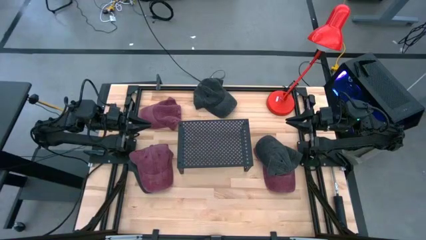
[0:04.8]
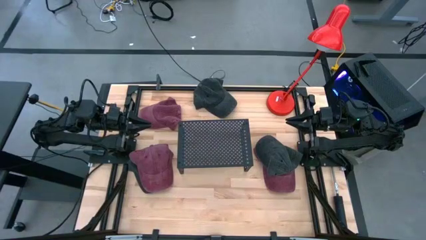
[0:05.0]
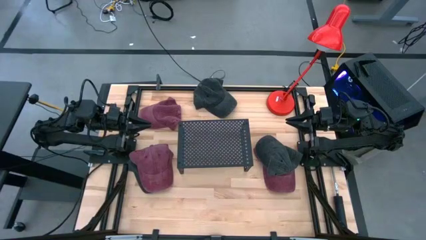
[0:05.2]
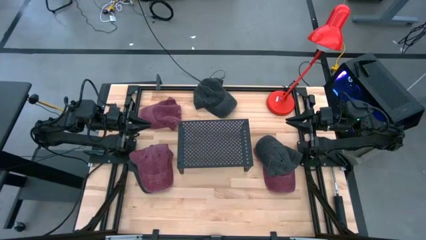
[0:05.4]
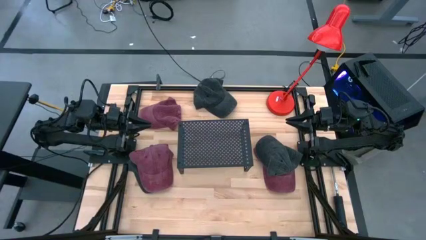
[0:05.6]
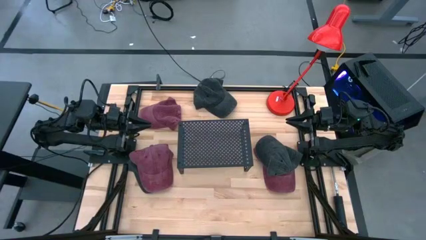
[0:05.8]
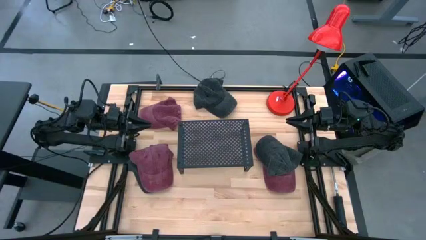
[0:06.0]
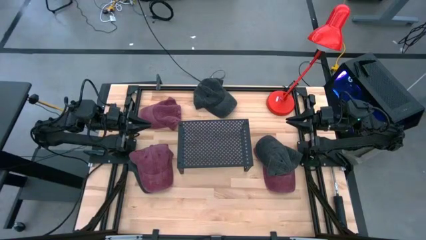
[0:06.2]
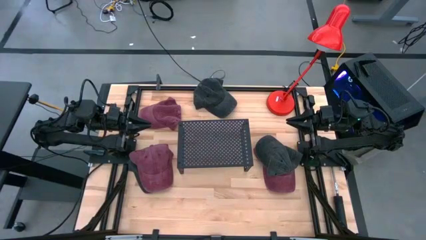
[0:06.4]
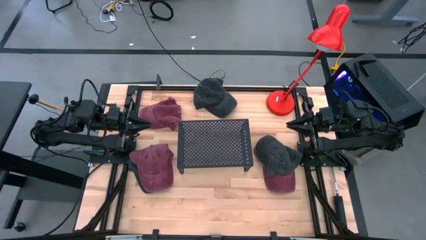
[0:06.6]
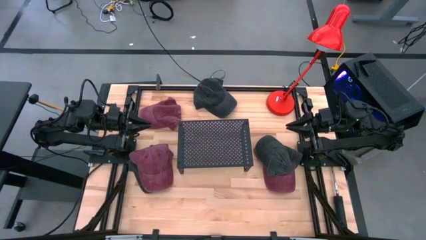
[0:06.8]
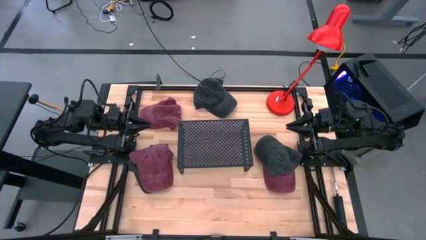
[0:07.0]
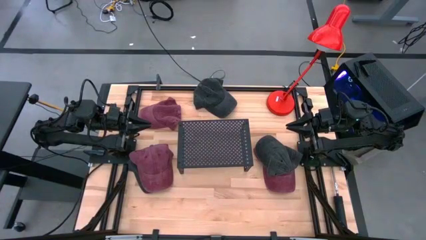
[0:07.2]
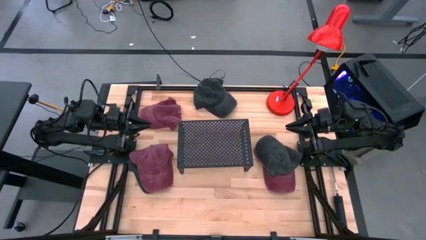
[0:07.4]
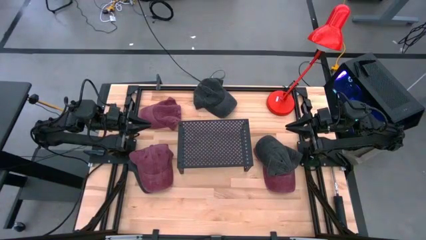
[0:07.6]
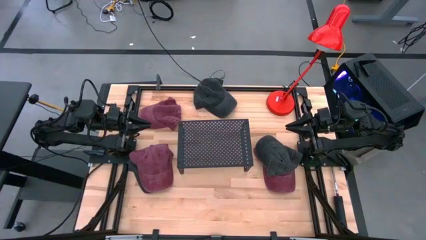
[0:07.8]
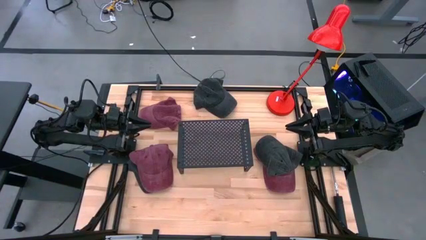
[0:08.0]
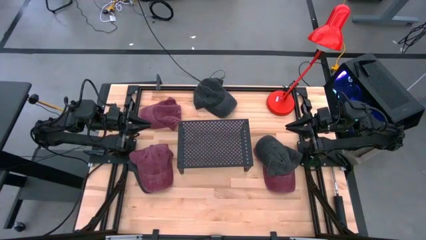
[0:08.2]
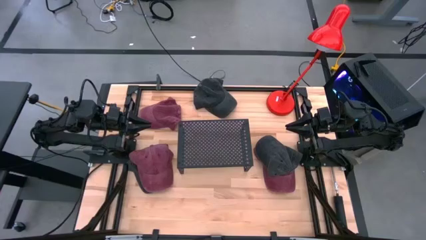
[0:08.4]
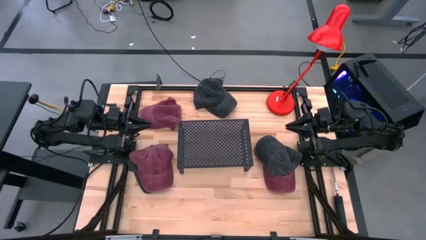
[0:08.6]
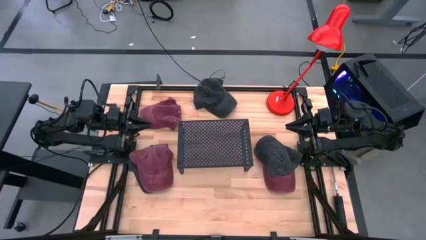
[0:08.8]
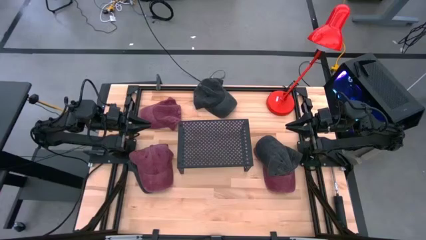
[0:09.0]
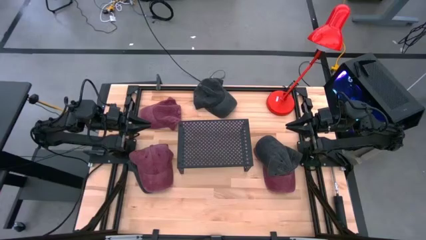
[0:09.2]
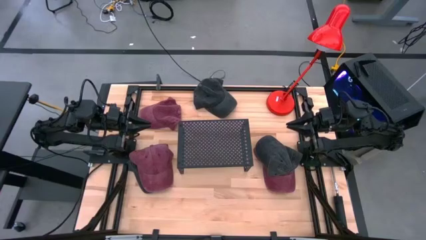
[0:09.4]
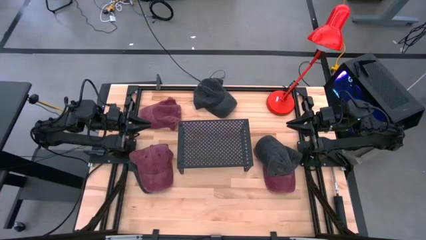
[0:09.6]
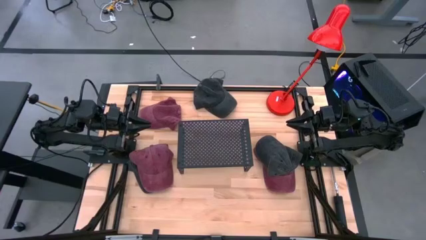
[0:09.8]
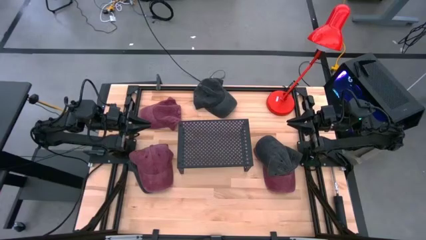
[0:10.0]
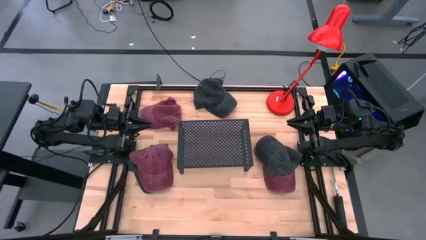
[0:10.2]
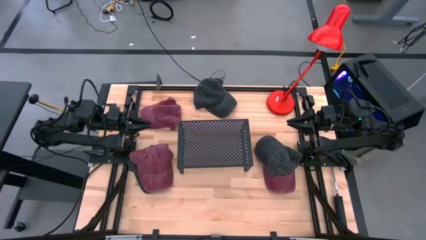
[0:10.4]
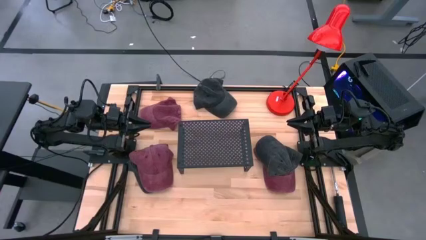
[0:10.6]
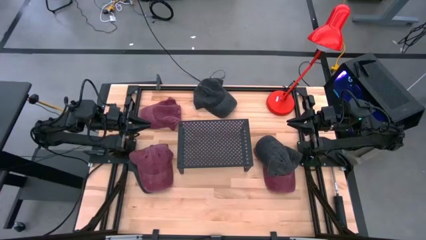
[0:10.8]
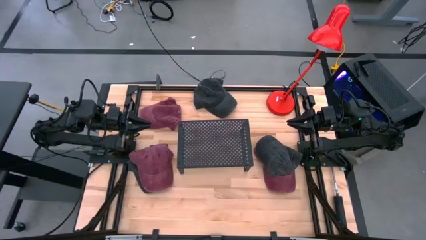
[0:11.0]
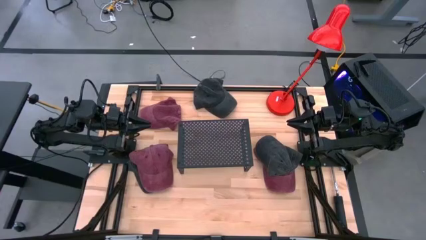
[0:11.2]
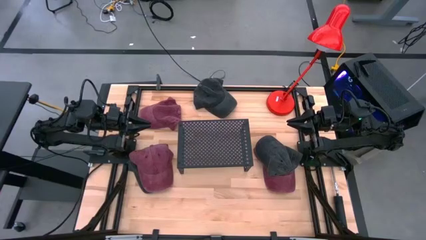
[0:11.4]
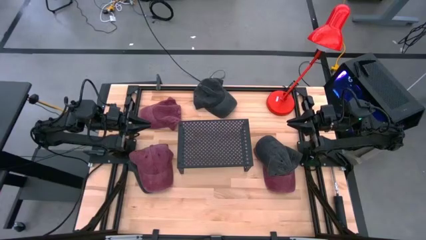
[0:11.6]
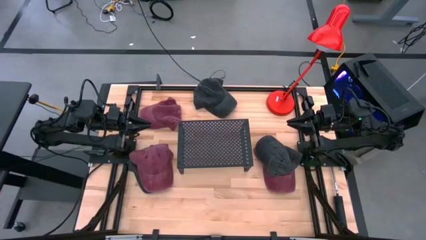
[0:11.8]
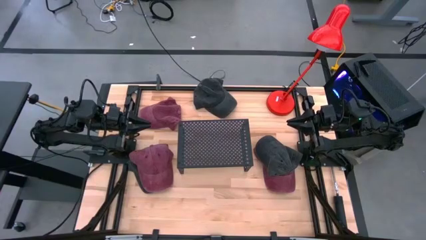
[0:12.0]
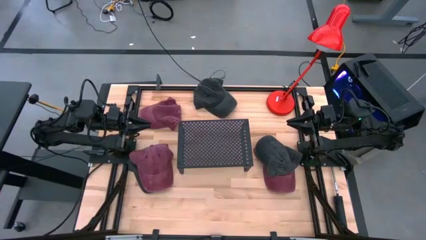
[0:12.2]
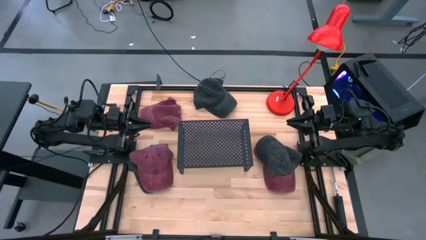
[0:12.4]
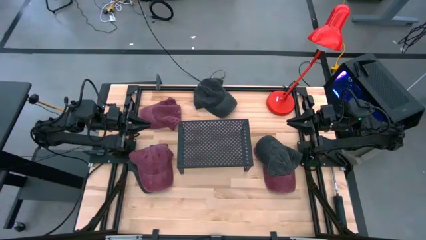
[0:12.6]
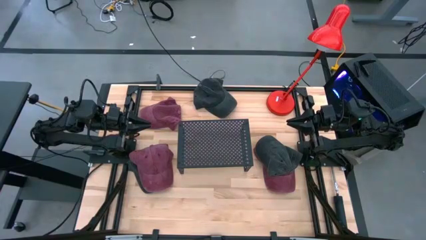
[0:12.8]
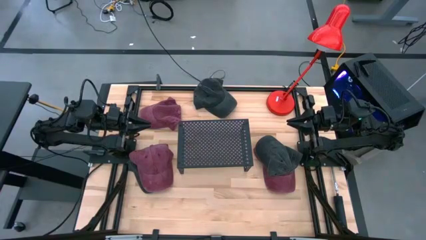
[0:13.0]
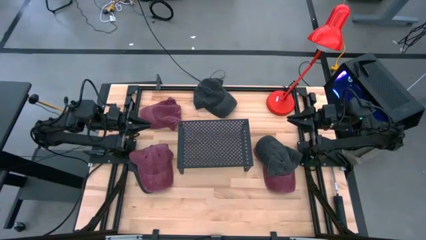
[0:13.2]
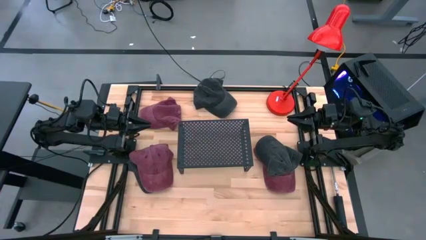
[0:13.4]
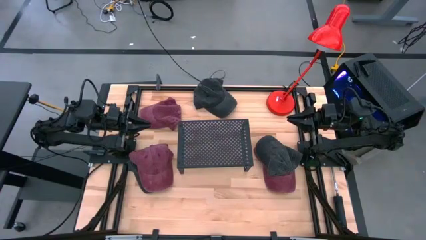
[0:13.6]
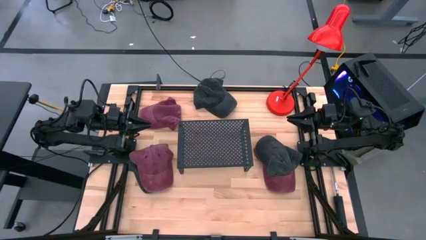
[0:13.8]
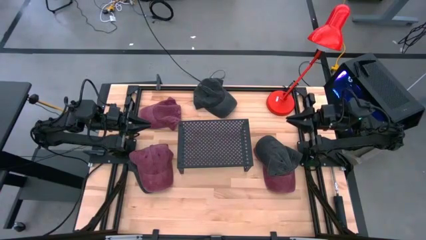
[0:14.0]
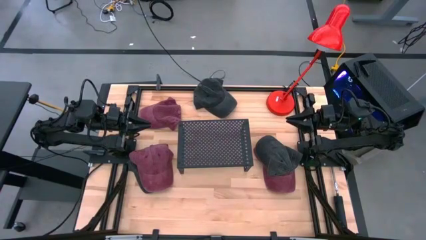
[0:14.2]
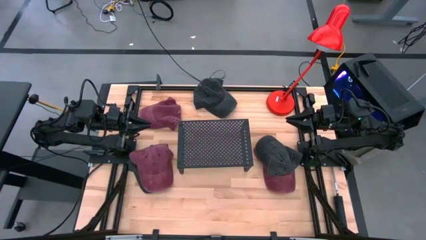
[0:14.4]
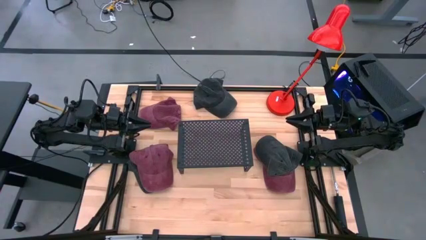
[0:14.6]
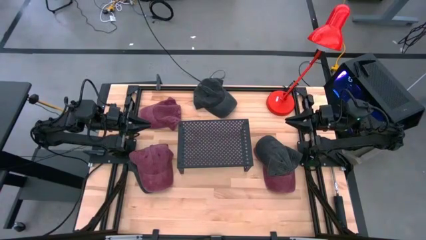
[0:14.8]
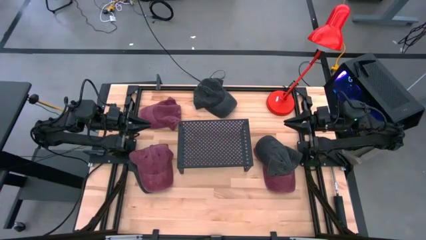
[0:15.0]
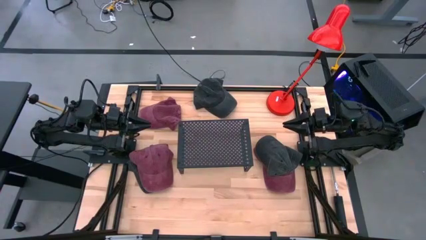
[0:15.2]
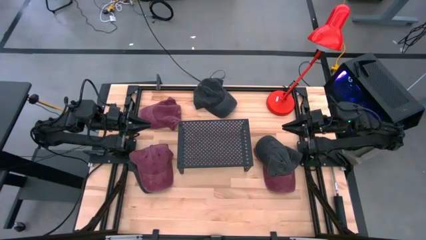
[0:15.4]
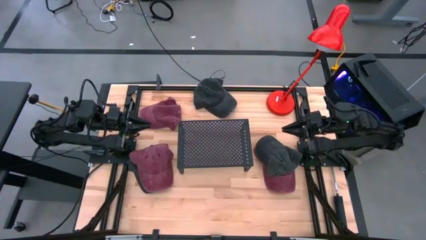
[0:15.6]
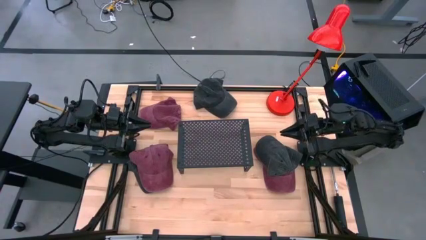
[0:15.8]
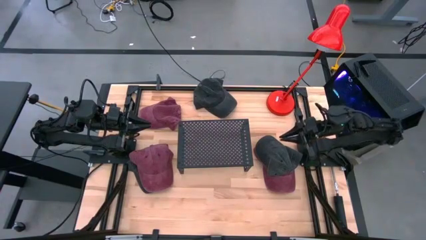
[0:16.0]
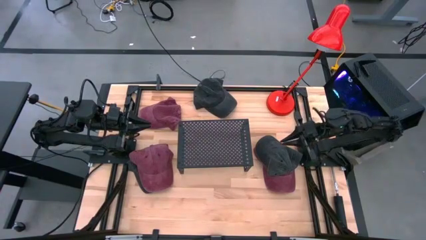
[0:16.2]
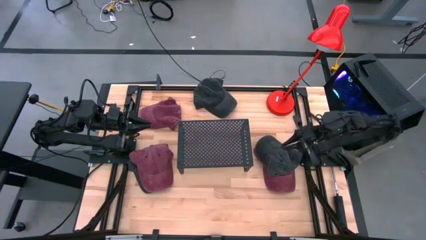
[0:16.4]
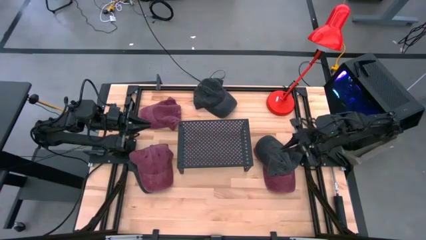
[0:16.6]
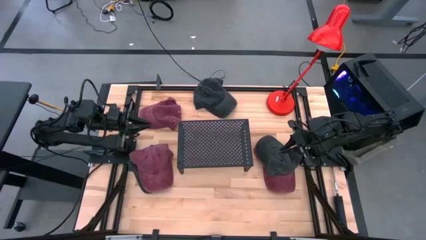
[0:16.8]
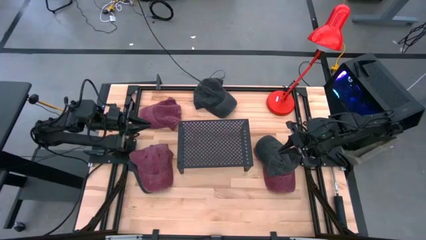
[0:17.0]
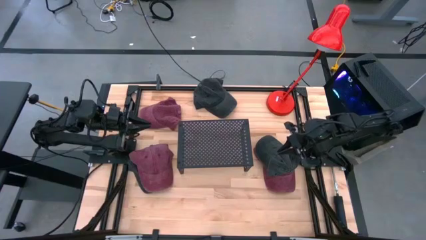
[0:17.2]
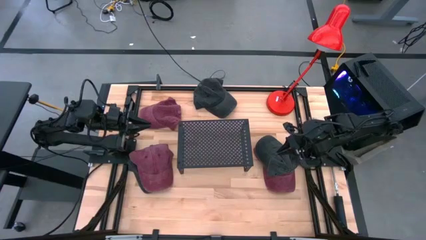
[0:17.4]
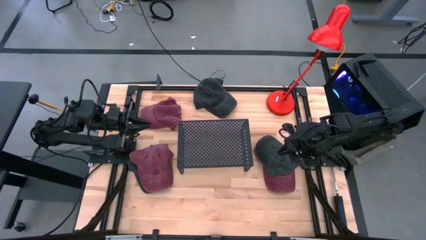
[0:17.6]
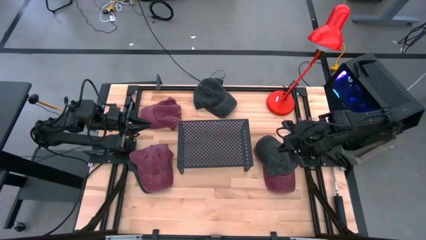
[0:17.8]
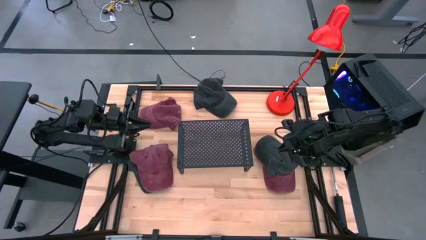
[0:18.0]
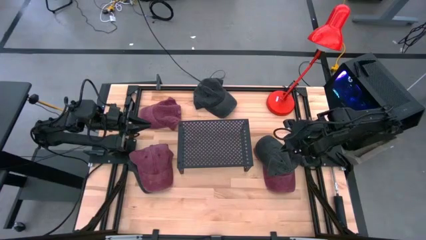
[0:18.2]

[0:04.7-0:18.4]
Task: Pick & Place hat
Put the bottom right black cap on the shelf

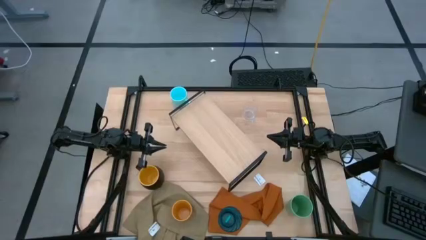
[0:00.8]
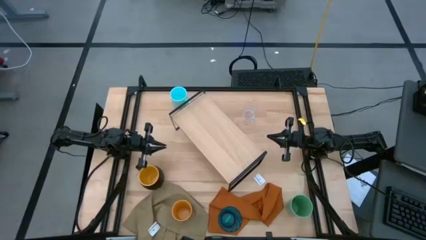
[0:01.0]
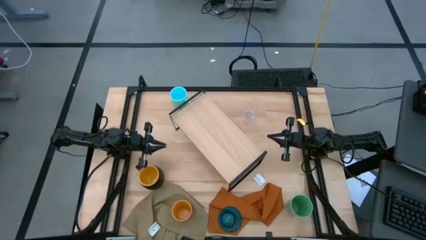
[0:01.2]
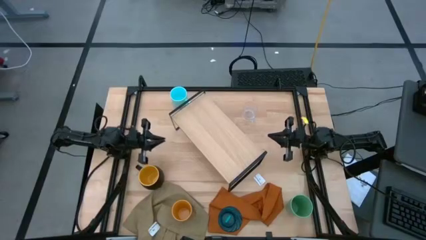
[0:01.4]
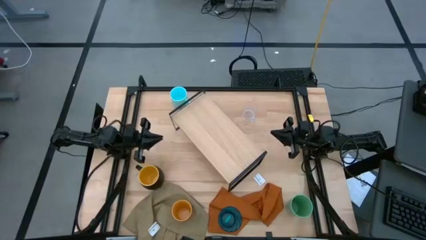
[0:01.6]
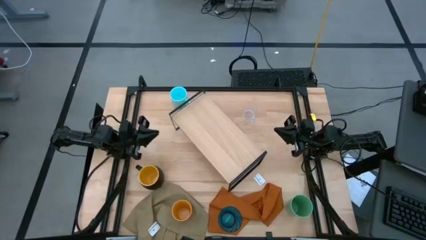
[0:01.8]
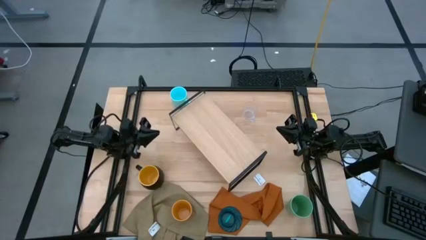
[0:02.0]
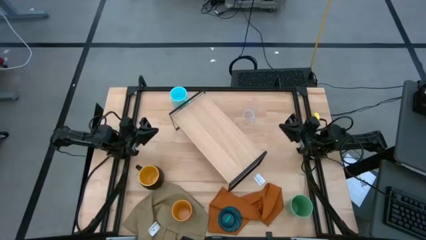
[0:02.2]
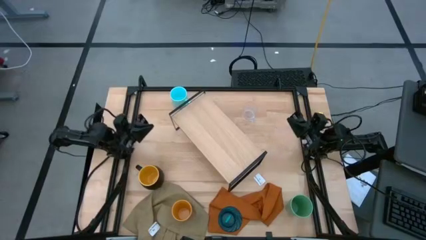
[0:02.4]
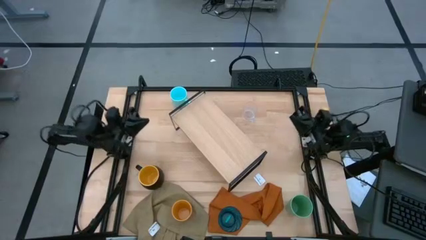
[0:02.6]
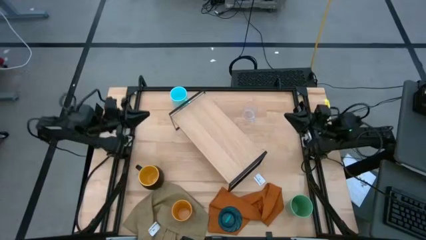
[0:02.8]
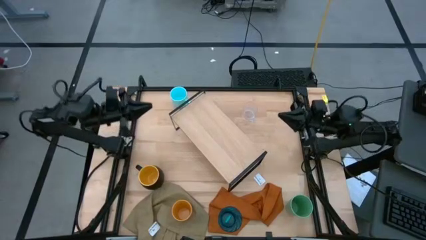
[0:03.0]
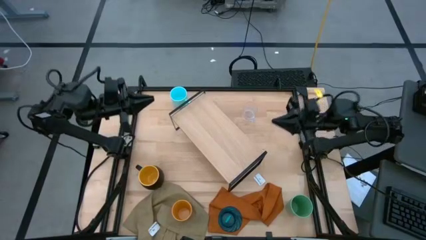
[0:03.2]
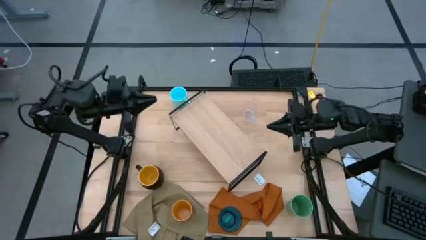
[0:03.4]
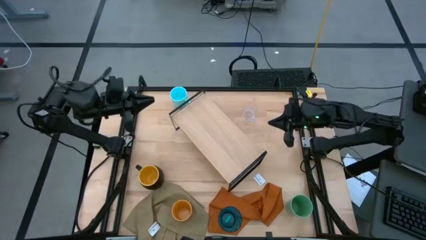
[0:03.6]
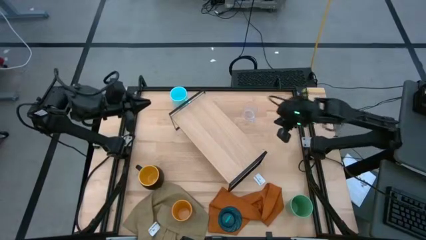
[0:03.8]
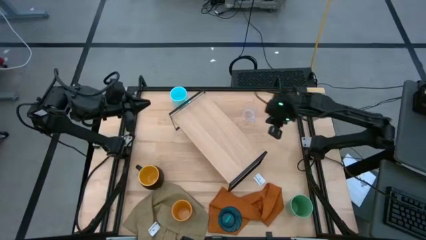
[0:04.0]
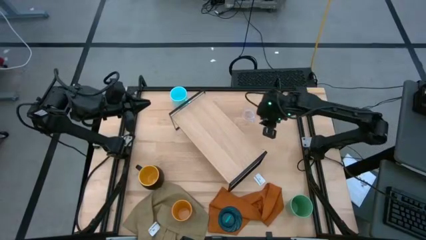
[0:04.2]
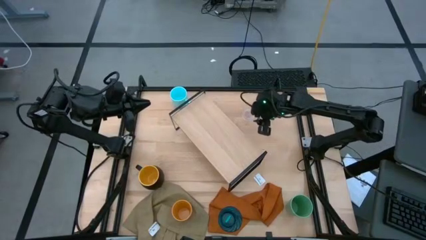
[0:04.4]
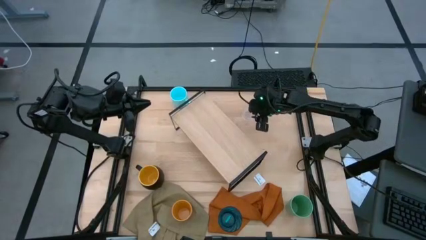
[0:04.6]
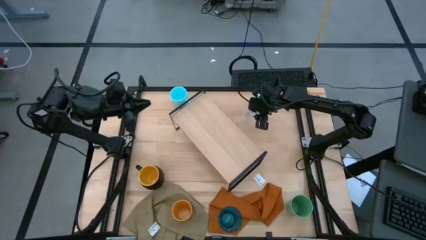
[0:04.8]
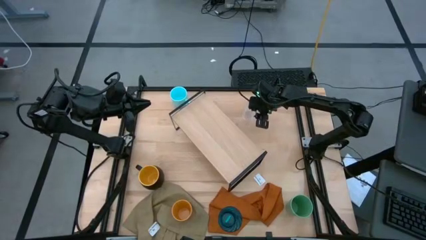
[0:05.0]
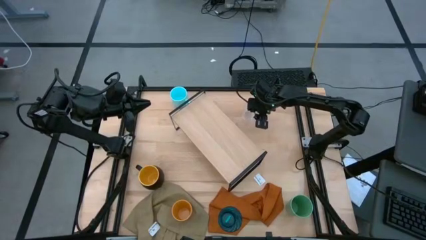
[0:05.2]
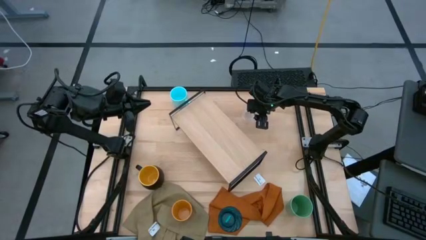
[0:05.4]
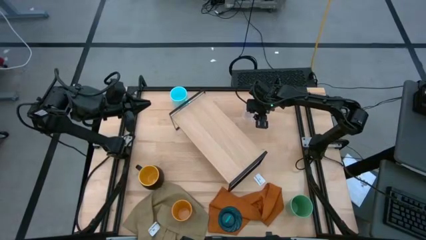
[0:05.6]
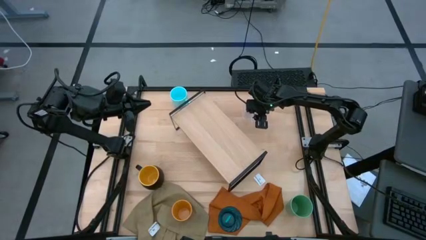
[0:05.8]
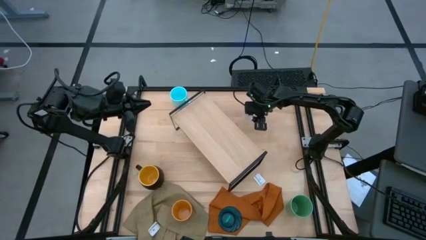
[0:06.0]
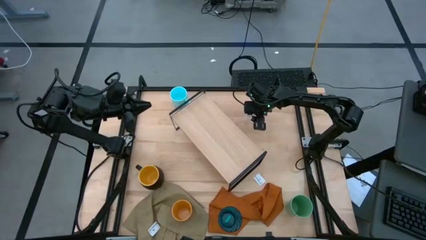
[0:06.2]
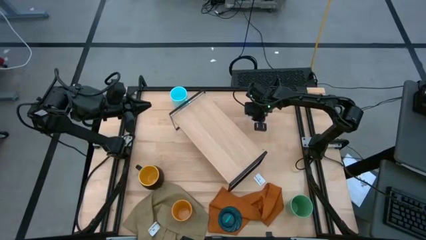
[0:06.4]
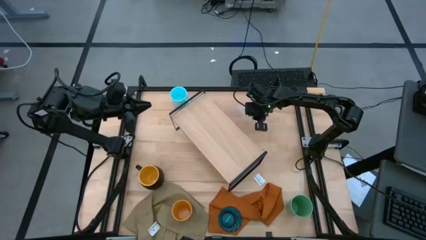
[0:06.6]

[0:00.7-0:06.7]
Task: Stack small to large cups/mugs on shelf
Put the transparent mug on the shelf
